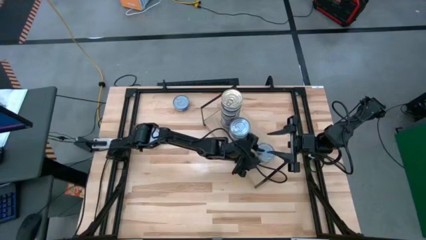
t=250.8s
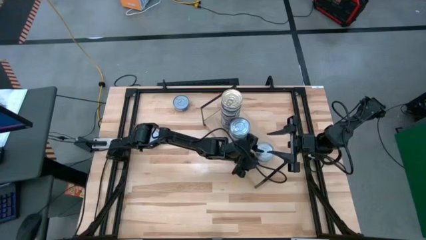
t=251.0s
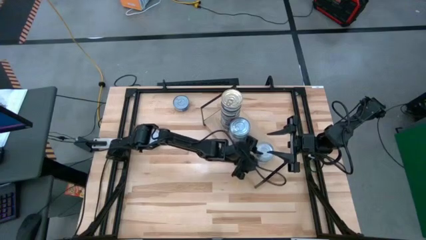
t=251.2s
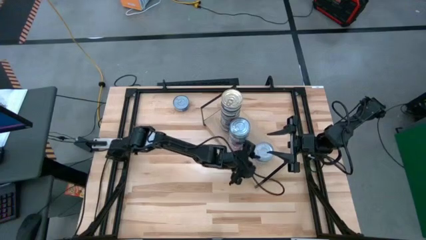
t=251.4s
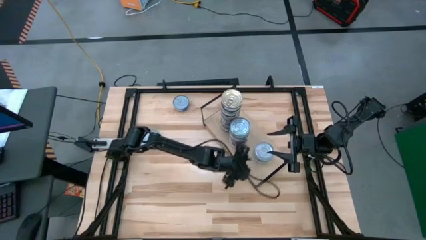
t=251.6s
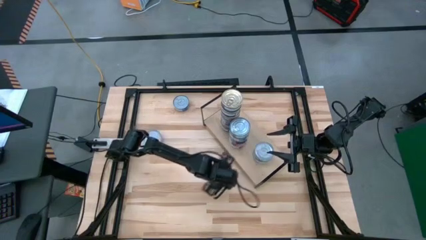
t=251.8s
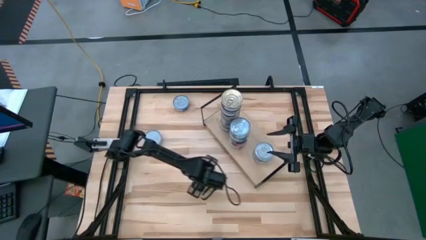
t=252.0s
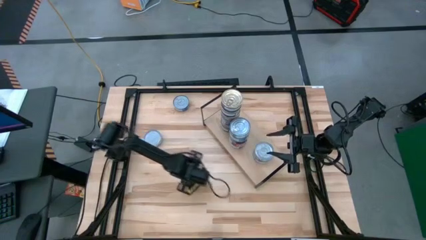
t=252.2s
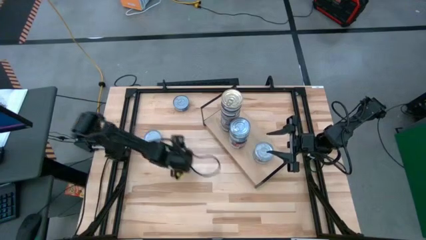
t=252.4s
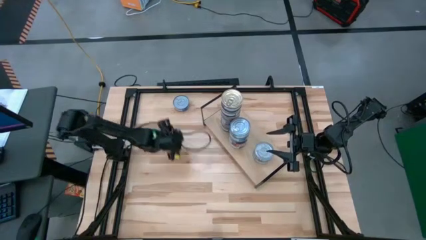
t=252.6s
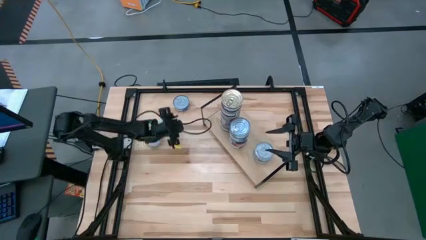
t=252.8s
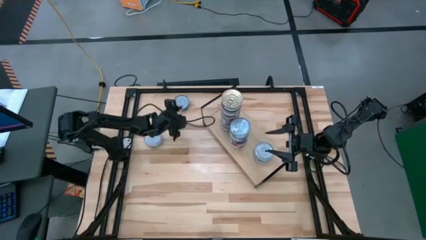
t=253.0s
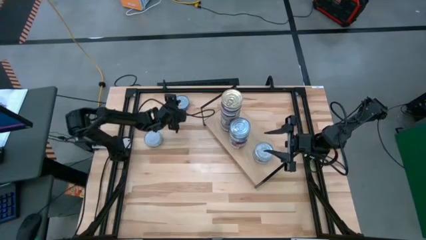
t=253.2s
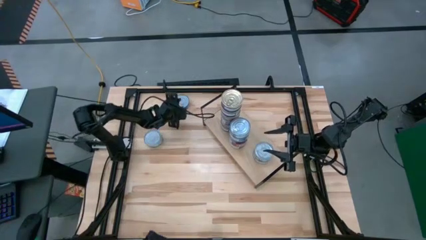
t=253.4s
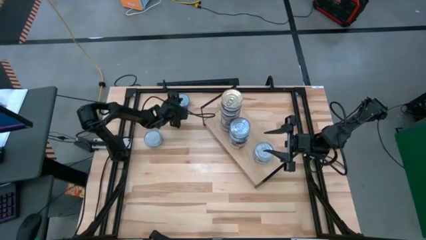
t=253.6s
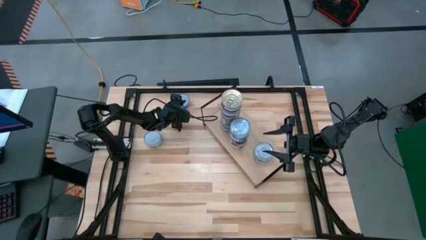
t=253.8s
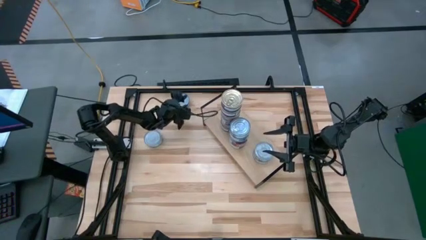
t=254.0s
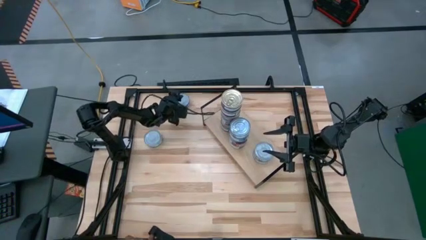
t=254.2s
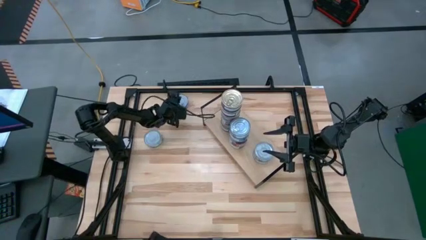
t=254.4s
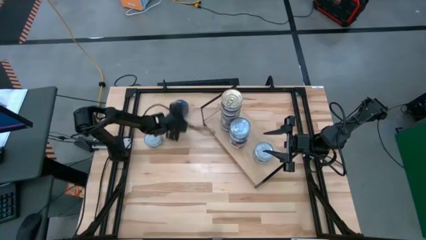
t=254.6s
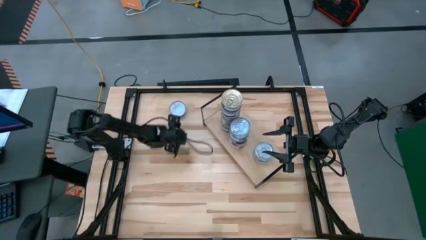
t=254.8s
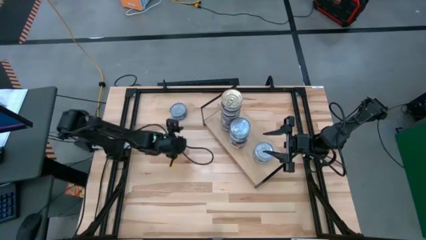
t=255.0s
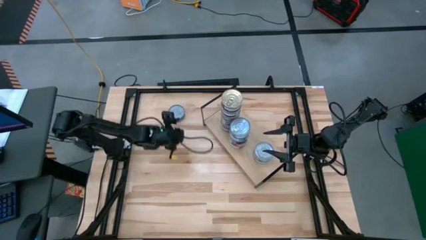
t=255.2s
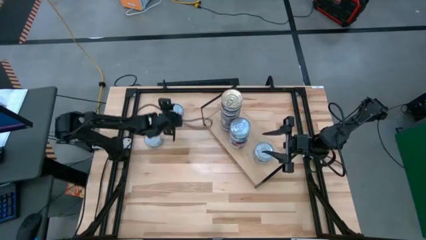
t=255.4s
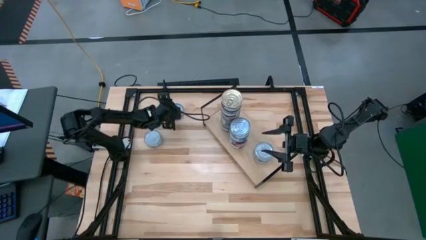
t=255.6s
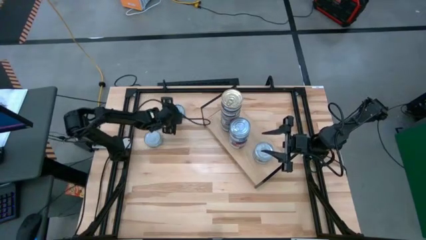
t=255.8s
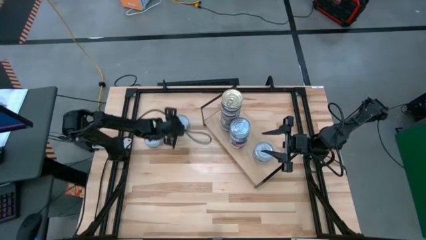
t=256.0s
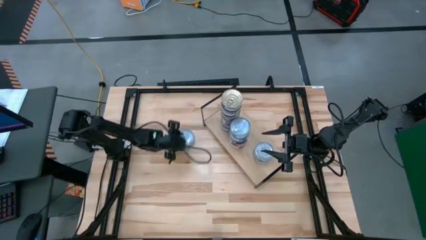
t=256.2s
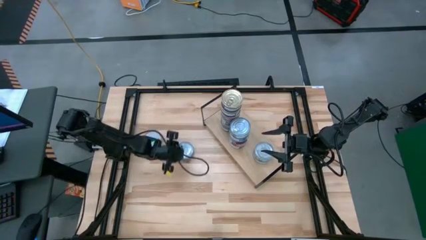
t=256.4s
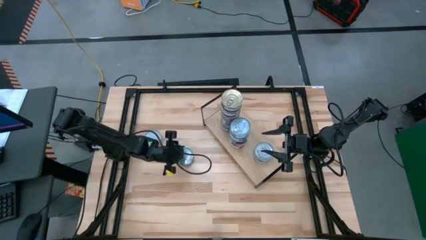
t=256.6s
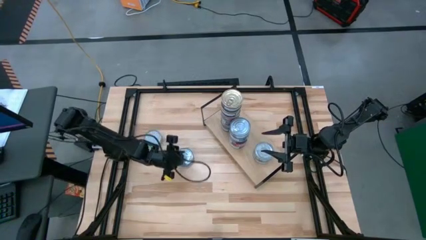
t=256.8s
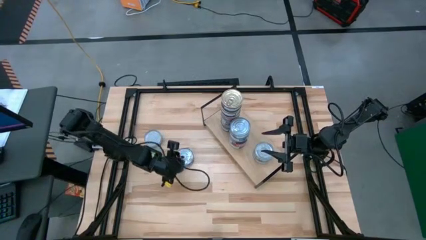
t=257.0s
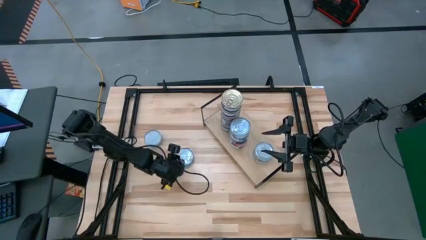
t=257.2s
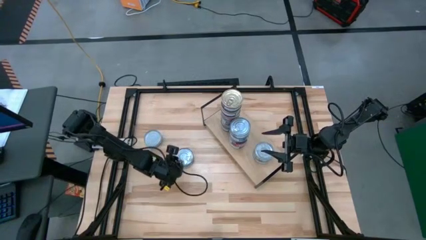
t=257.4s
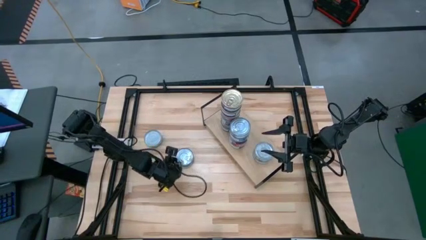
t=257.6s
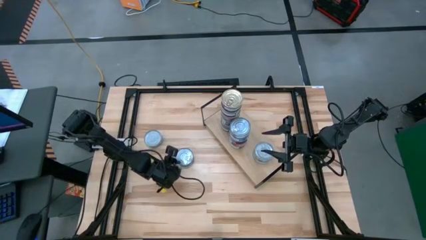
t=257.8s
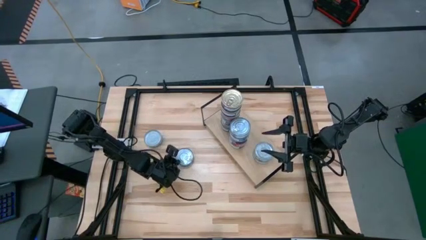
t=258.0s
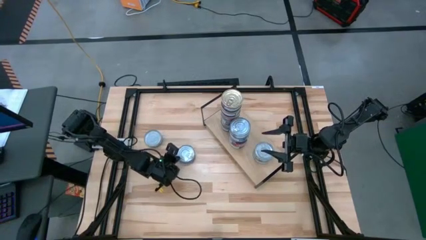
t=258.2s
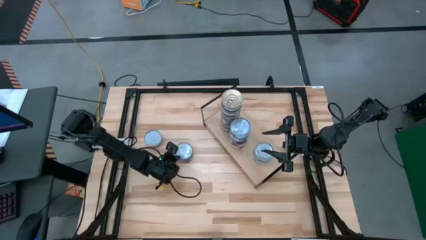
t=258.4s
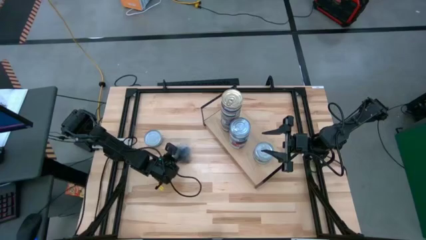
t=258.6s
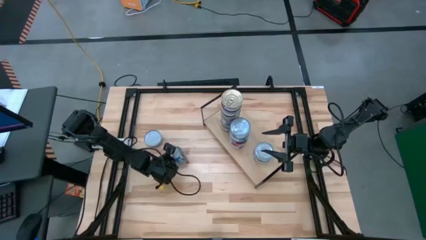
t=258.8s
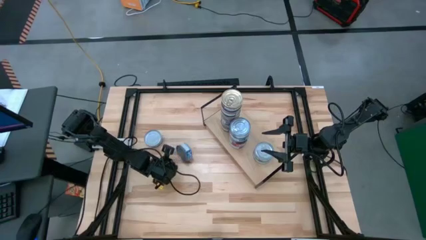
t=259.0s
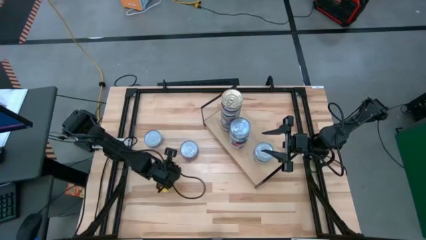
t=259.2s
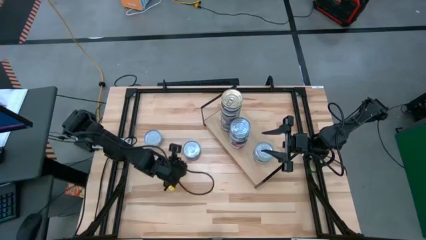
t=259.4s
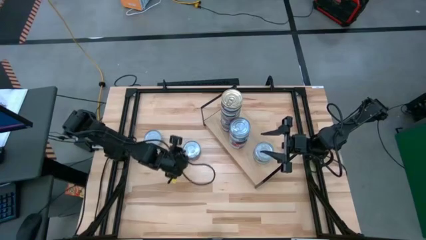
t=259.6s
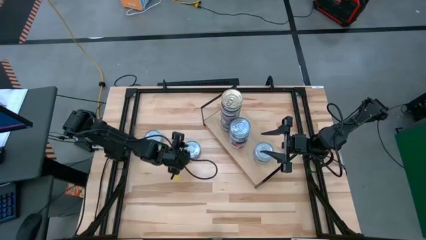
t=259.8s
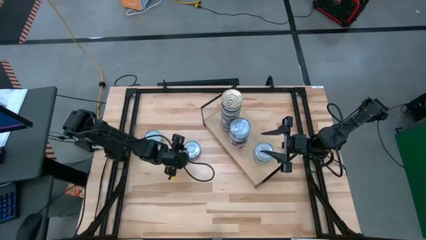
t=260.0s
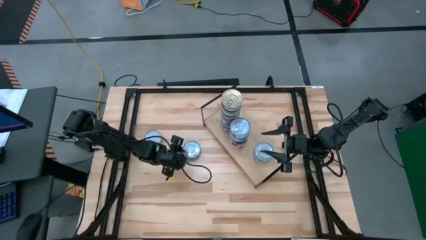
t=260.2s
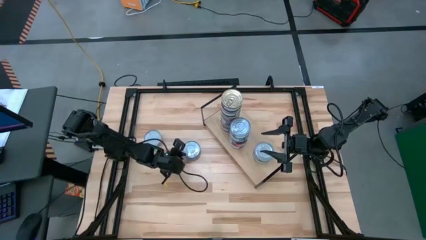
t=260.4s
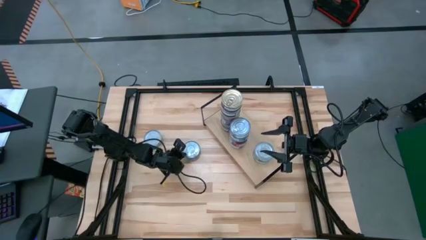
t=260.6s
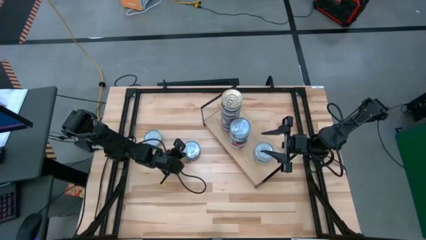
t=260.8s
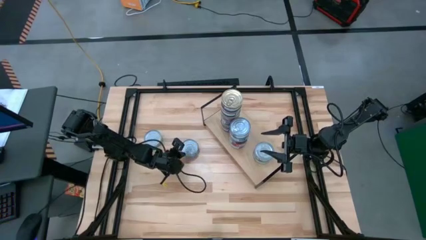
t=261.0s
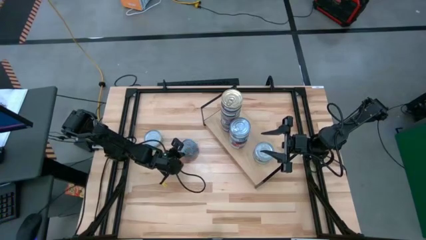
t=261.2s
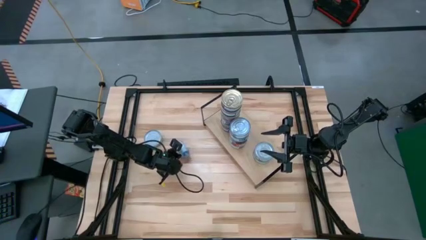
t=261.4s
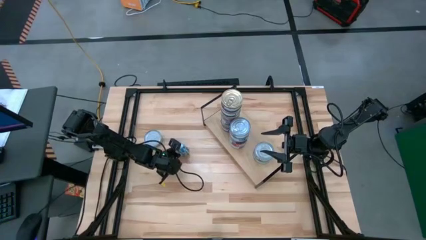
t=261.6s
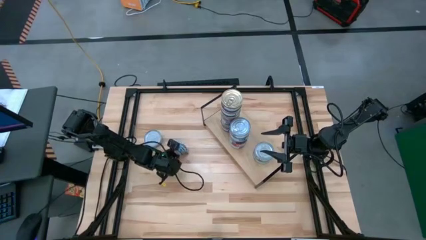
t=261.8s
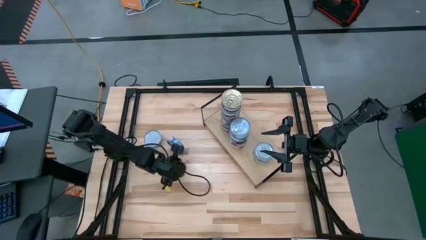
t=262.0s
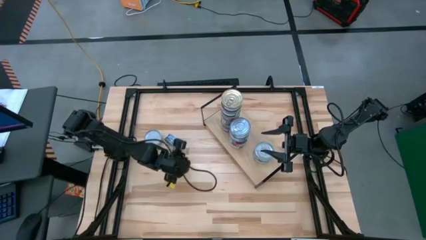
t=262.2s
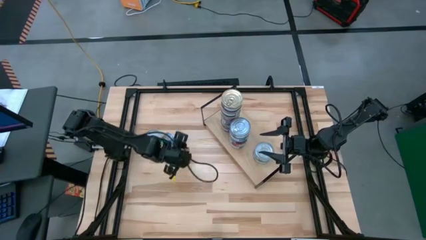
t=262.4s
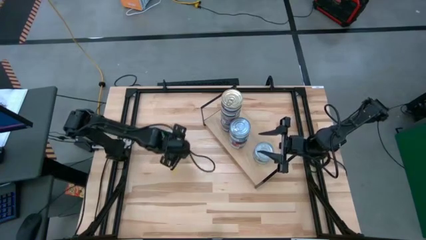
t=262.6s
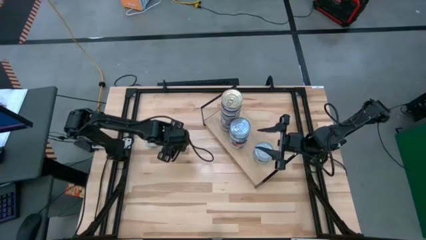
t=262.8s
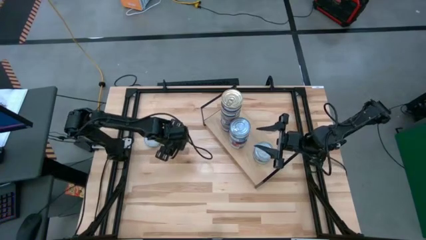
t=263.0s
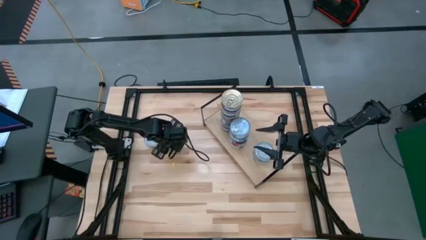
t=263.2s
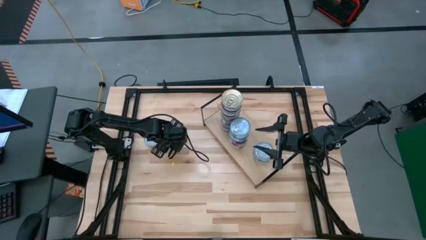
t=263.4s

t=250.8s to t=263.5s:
Task: Stack canned seafood by type on shelf
Stack the blue tuna can on top of the blue tuna can on the shelf

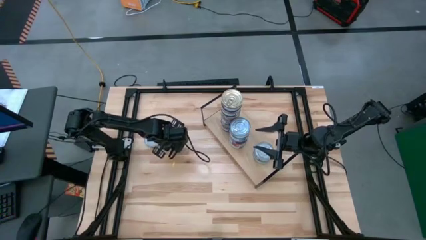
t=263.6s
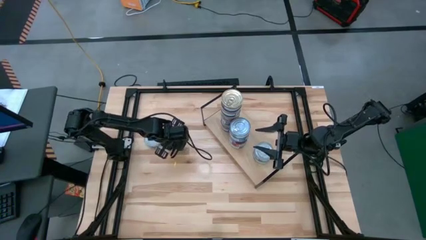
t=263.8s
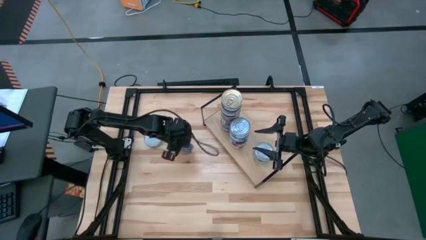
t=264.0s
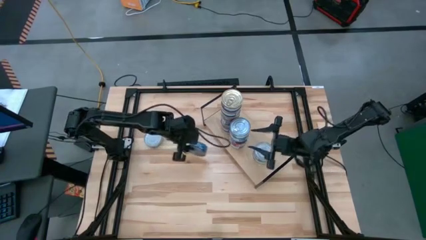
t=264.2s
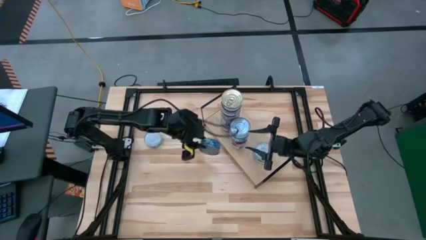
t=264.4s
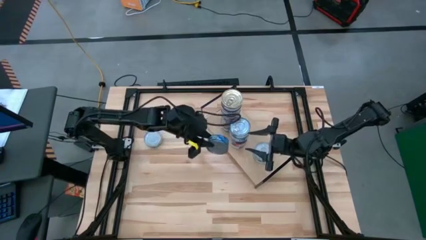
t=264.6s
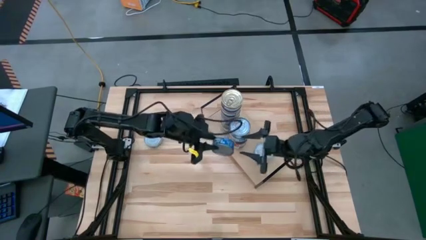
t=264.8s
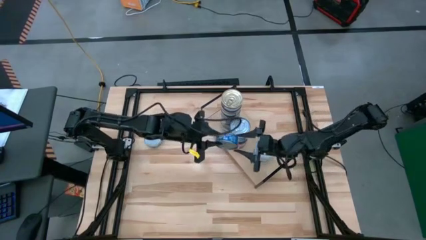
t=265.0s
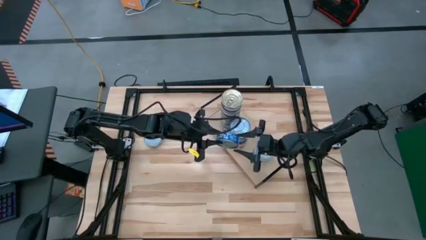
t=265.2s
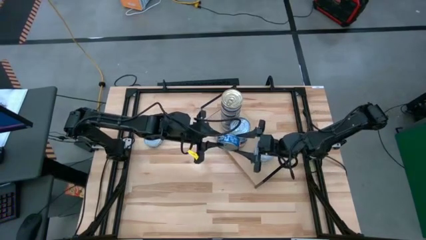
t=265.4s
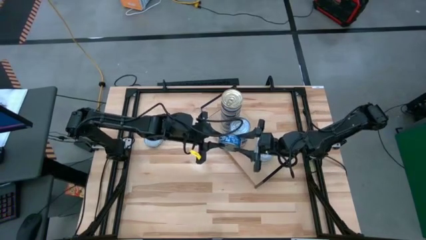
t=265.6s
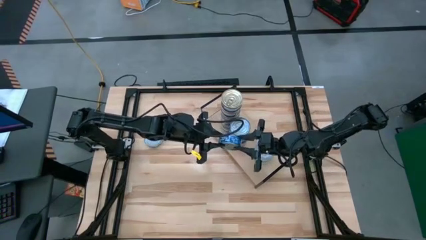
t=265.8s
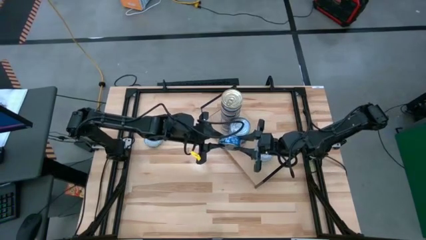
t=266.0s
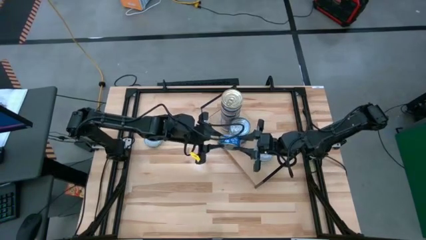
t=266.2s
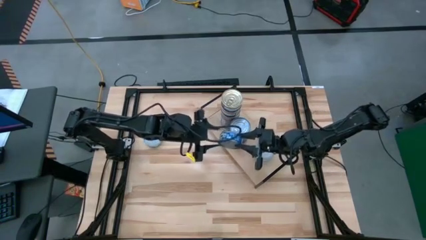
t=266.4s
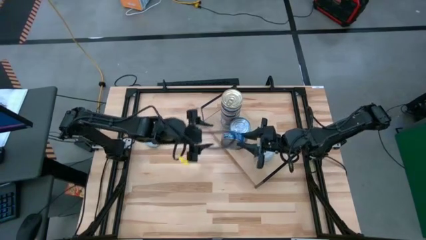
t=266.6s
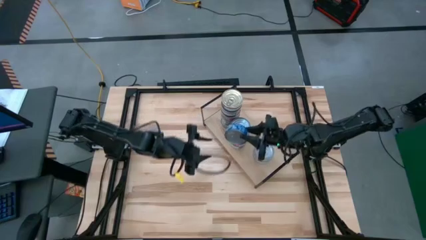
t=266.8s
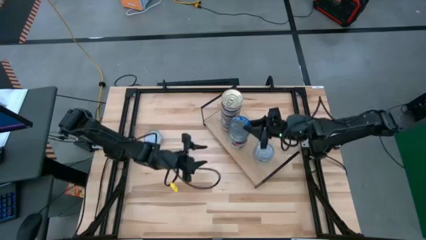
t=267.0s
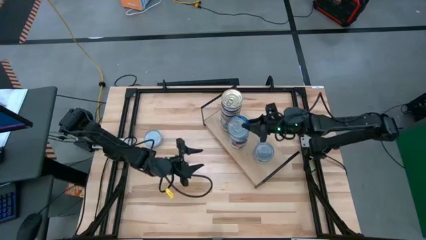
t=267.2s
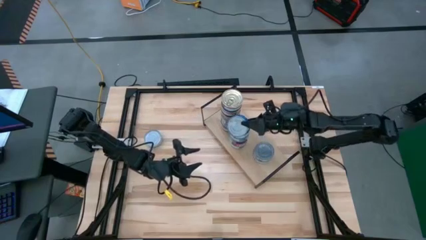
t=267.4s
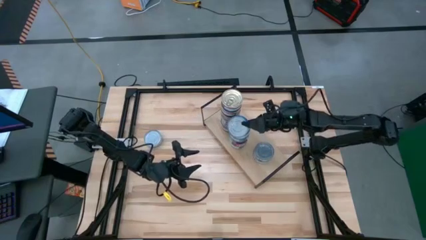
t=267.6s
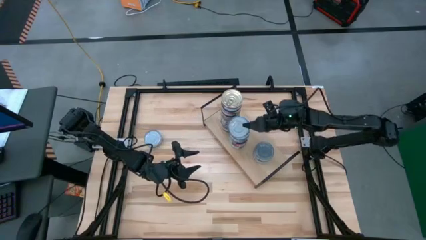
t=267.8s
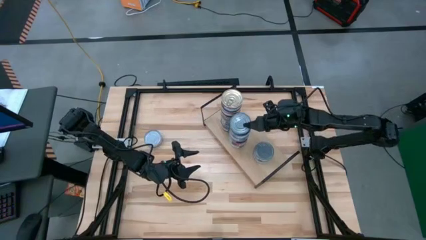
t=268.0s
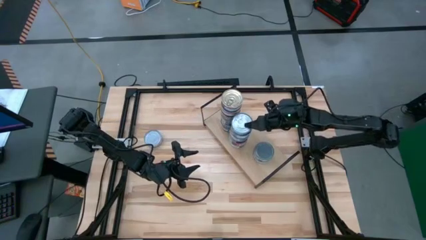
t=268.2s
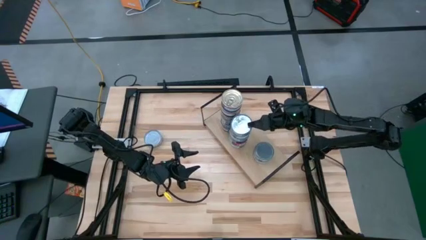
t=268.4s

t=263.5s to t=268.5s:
Stack the blue tuna can on top of the blue tuna can
